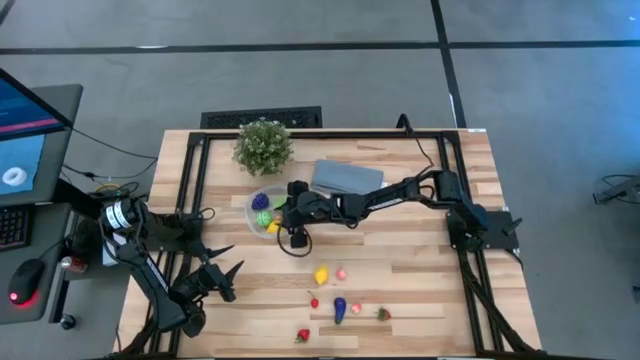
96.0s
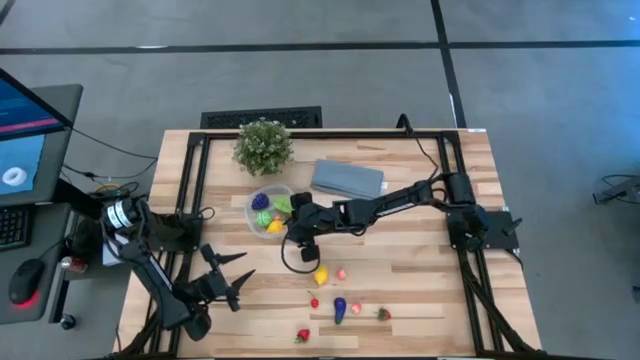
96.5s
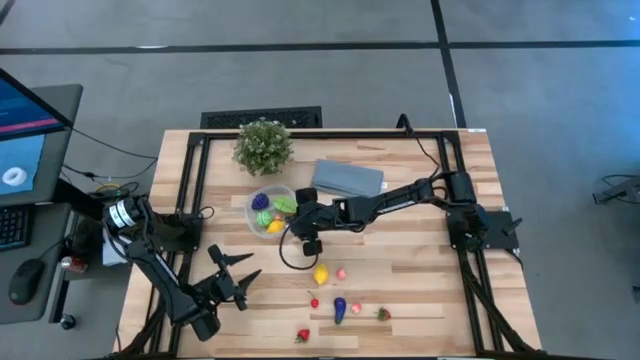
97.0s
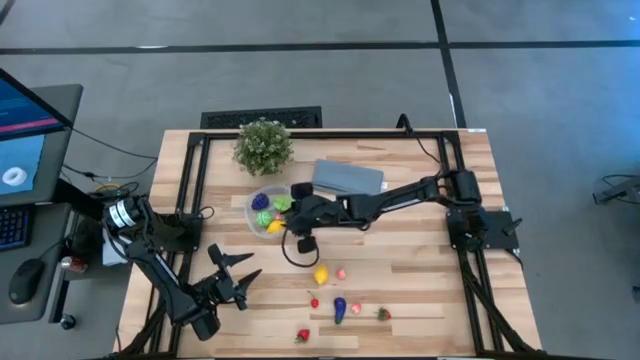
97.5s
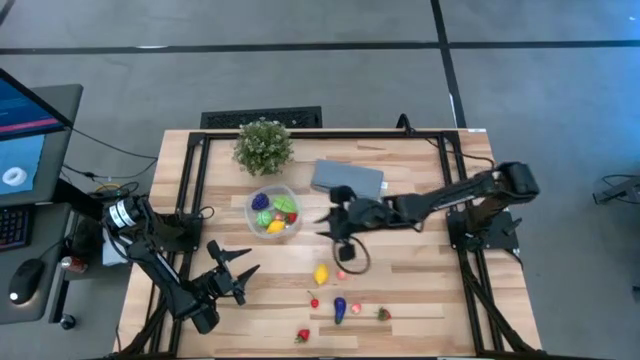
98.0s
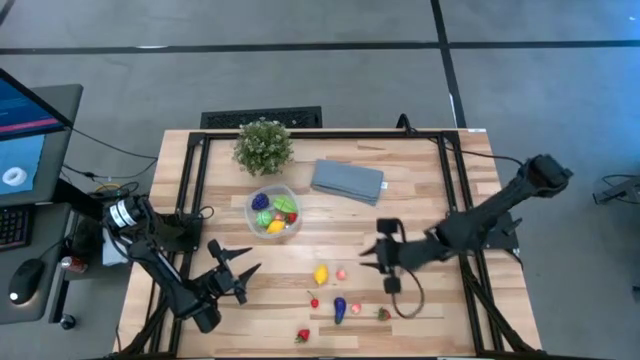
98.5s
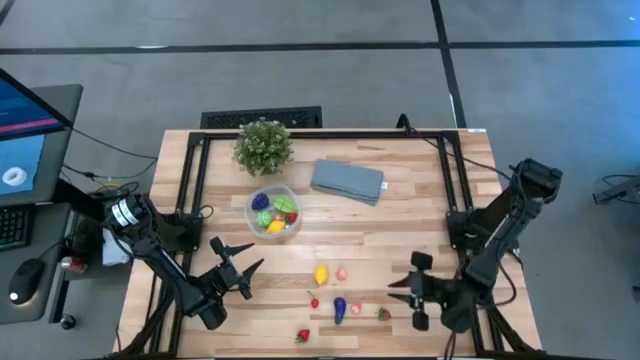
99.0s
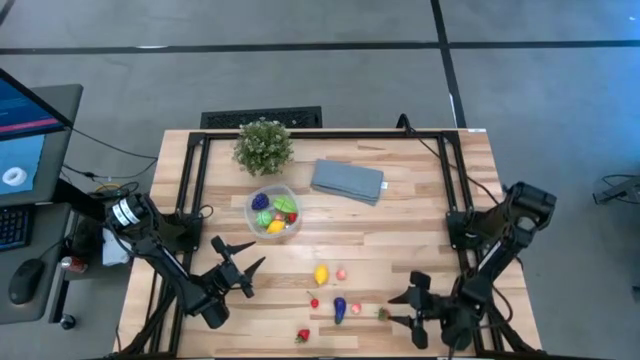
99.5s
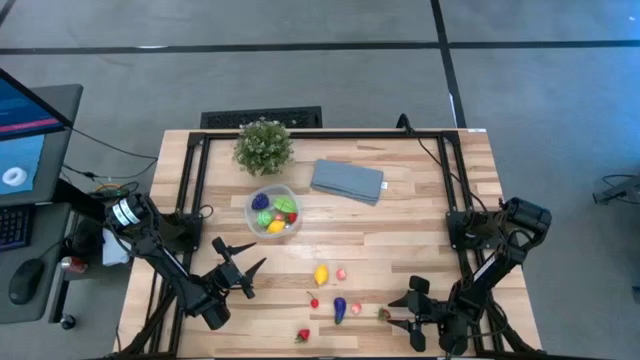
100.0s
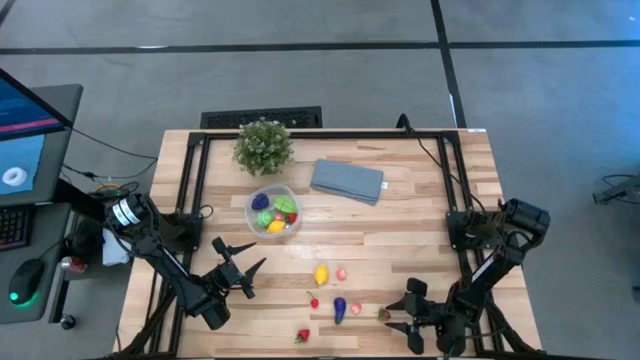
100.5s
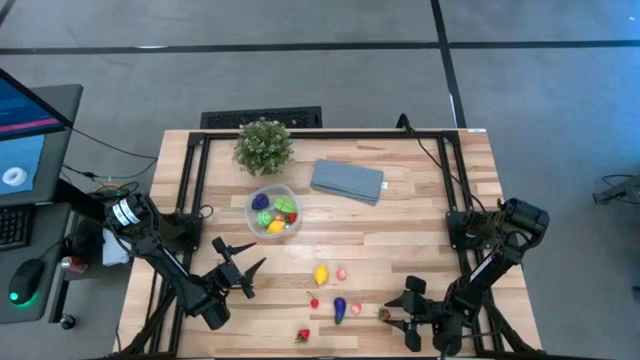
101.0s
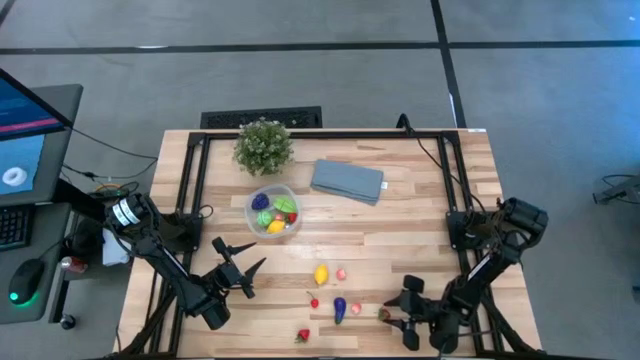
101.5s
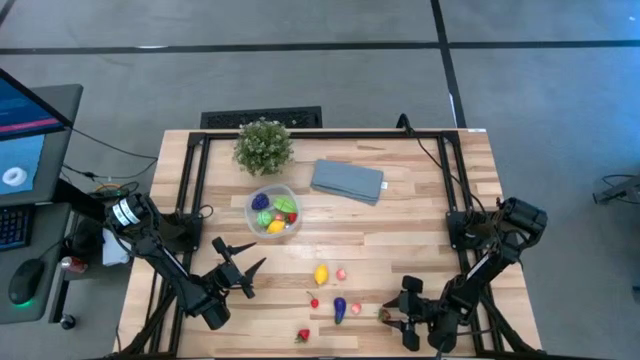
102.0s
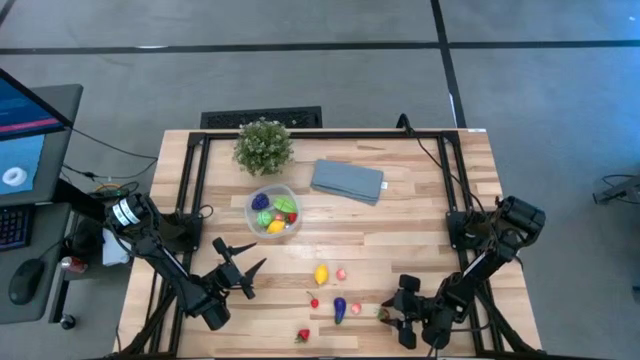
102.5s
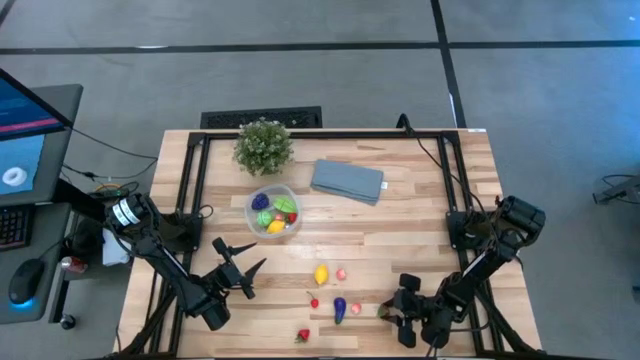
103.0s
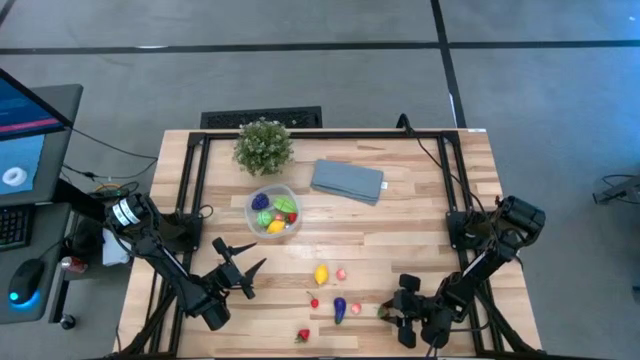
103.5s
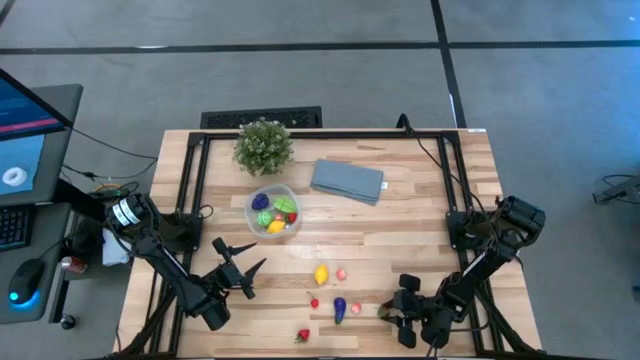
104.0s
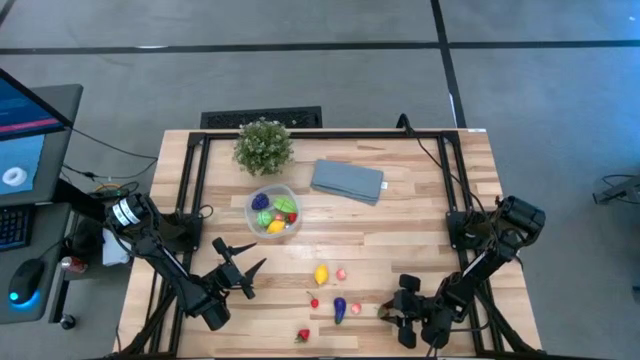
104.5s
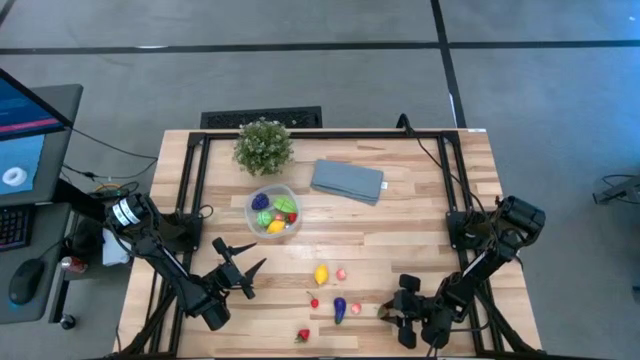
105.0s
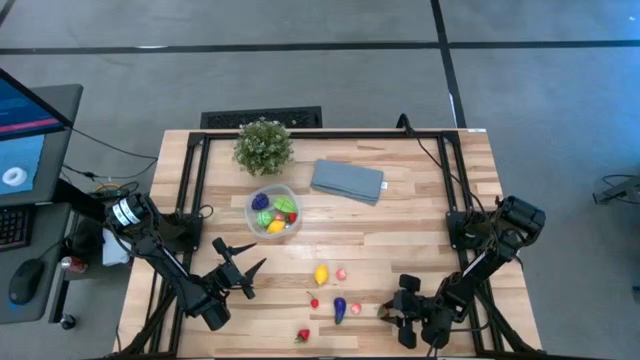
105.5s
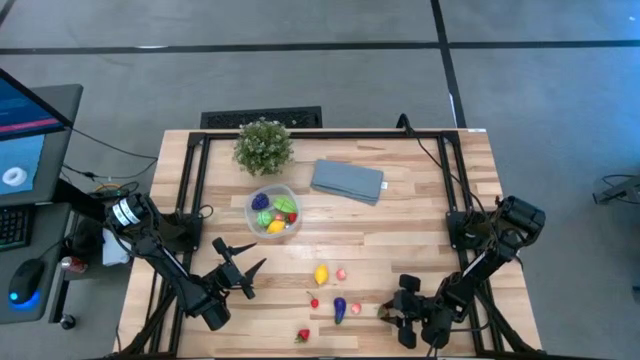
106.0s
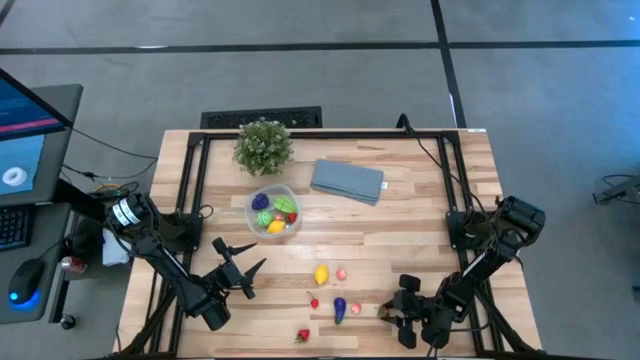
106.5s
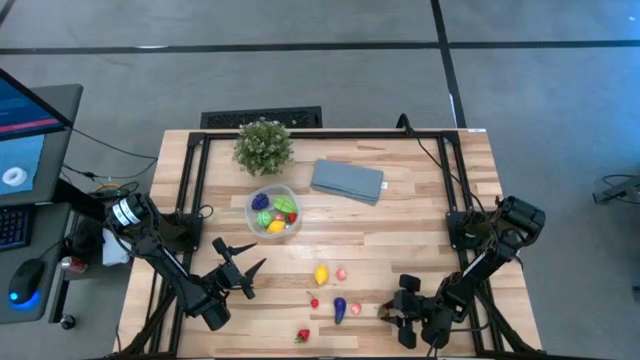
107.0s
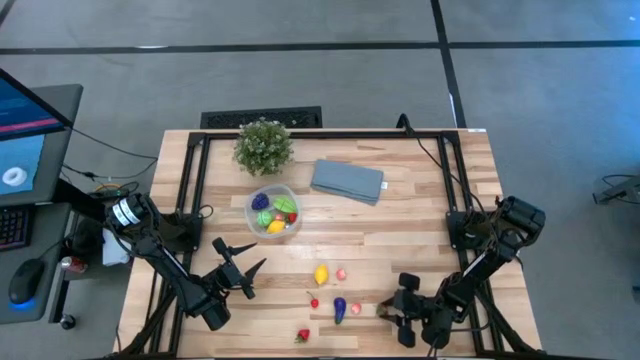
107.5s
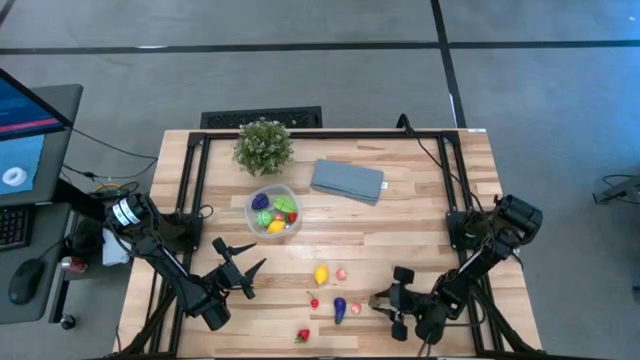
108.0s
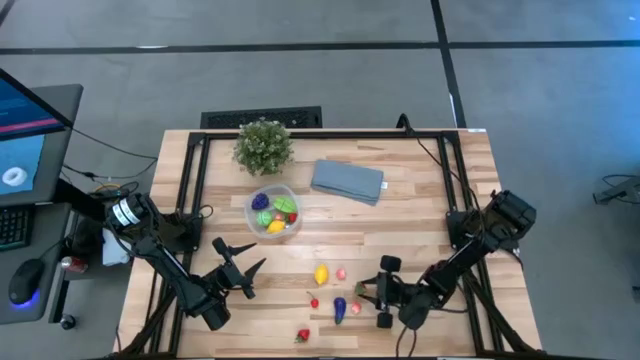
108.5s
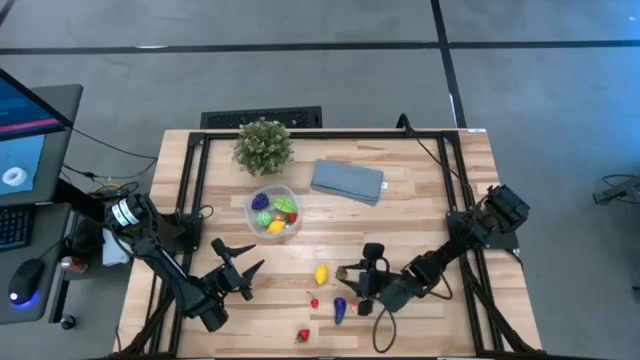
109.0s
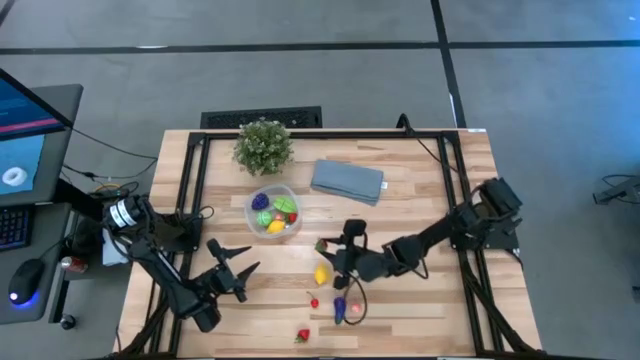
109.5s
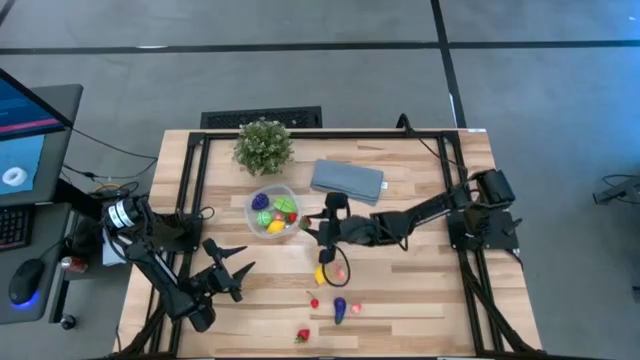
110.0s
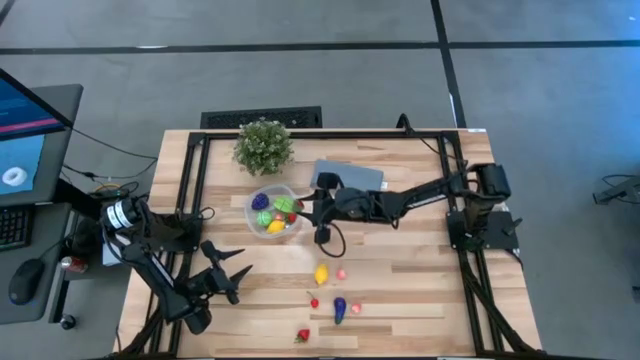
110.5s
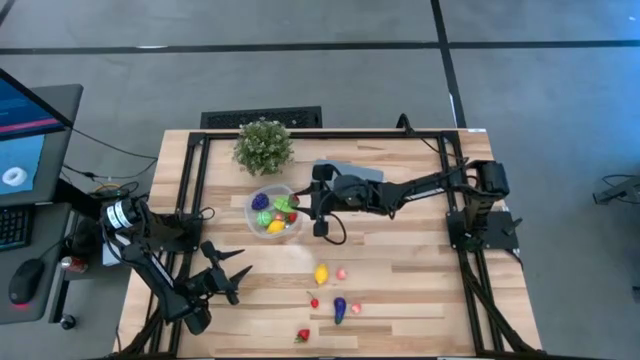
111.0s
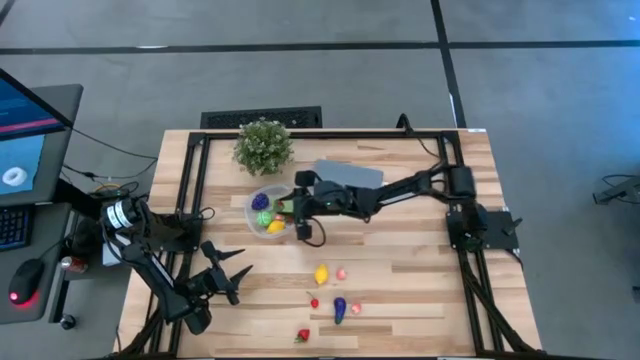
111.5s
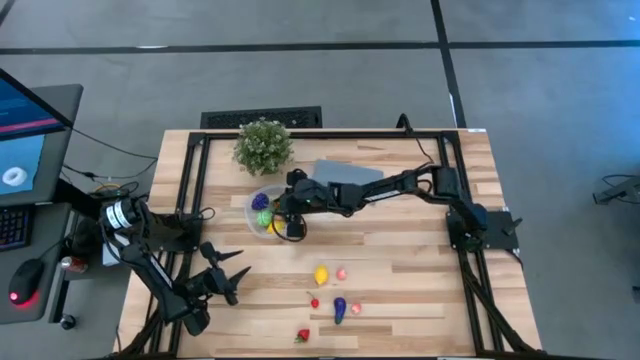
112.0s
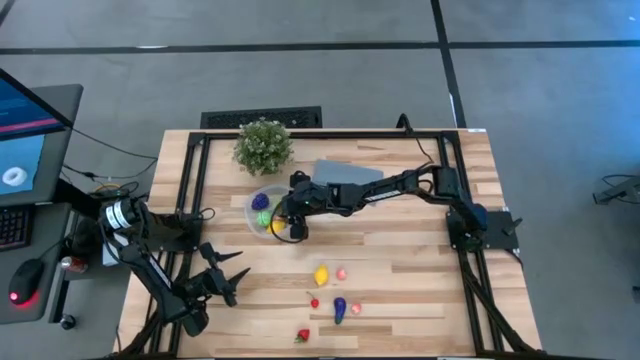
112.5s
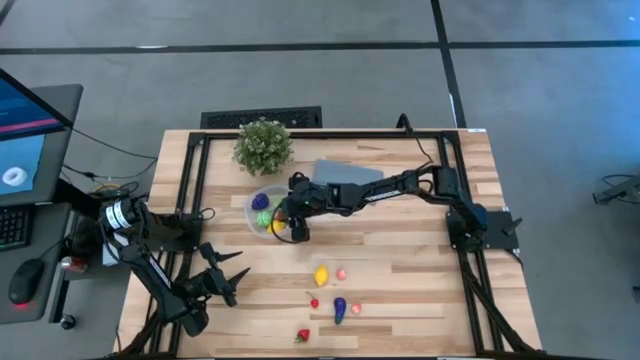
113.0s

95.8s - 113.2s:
Task: Pick and placing Produce into tupperware
Put the right strawberry into the transparent bin

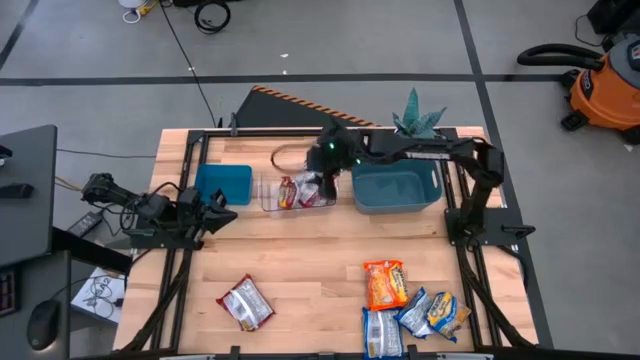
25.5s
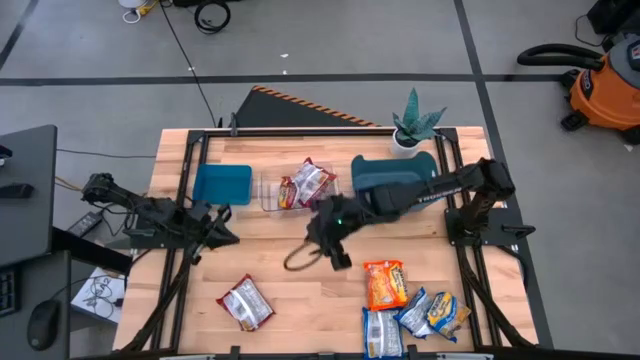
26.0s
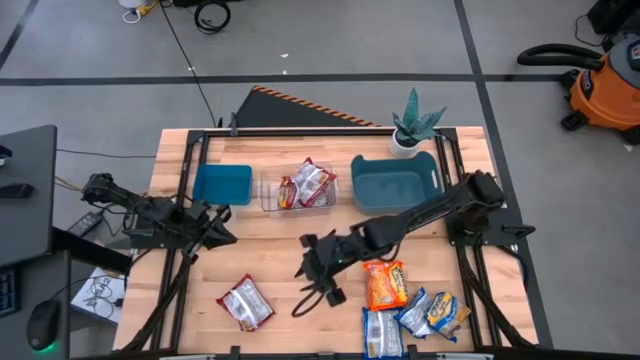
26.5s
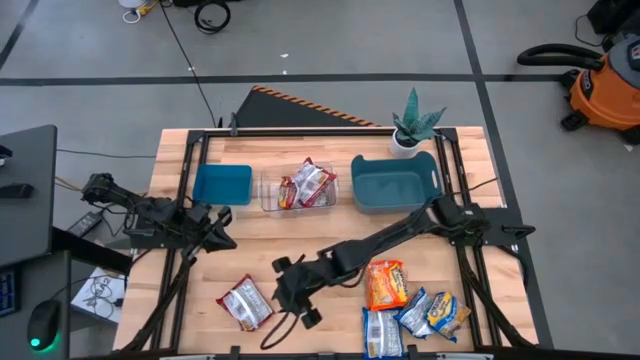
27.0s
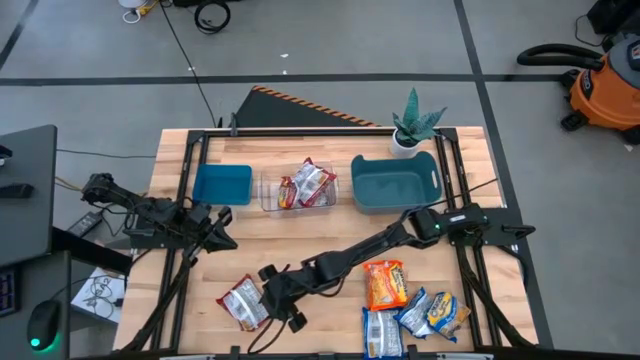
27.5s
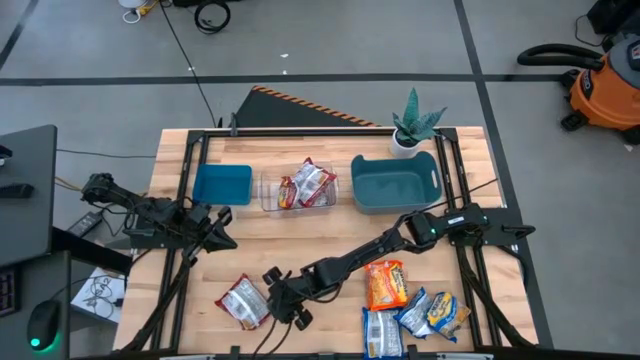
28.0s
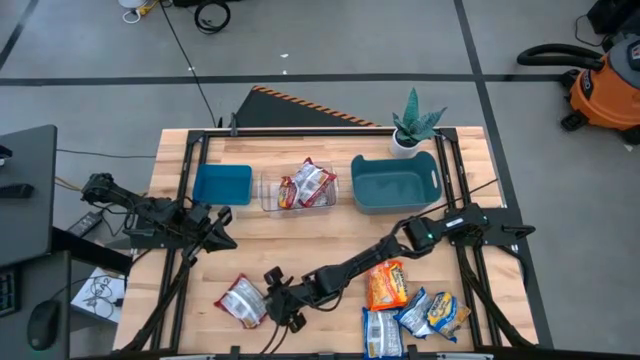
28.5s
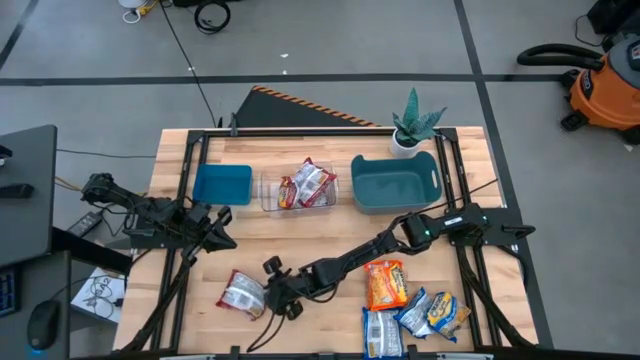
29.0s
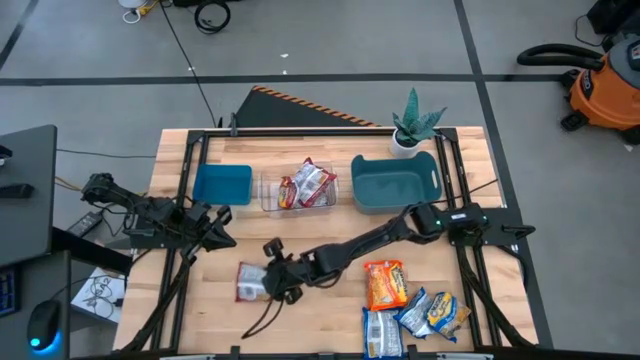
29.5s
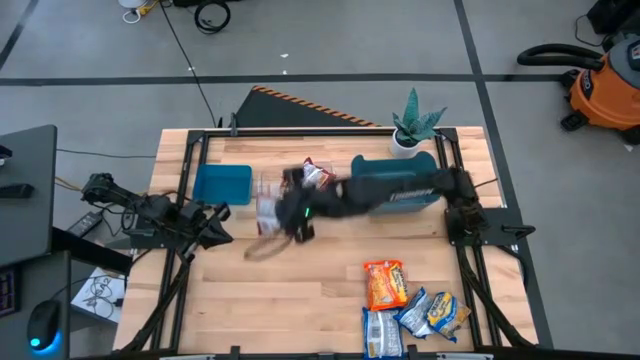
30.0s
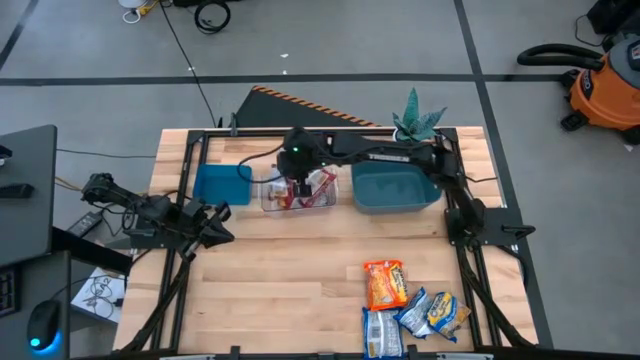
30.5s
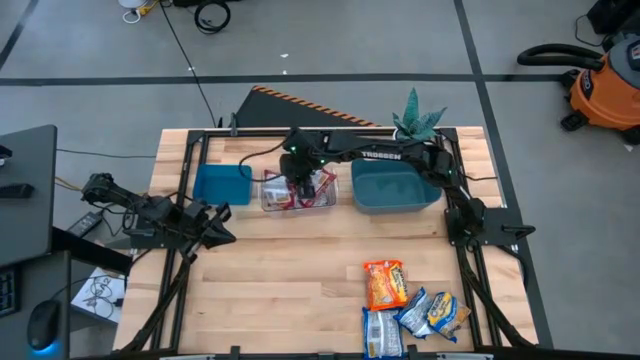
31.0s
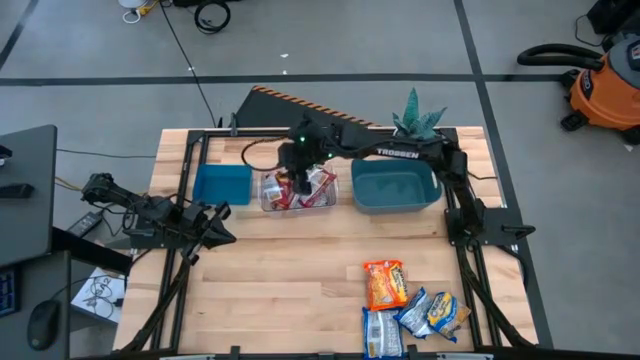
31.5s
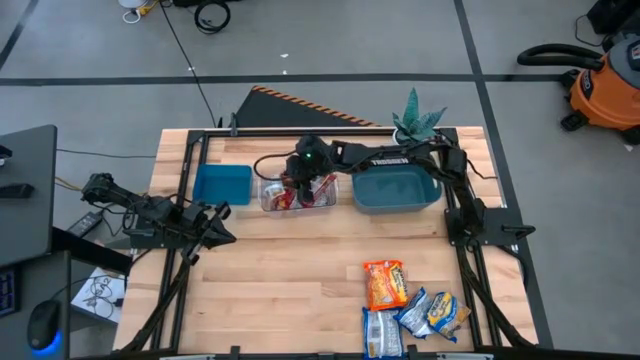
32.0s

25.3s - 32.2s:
Task: Sort Maruchan noodles
Put the red noodle pack into the transparent bin
